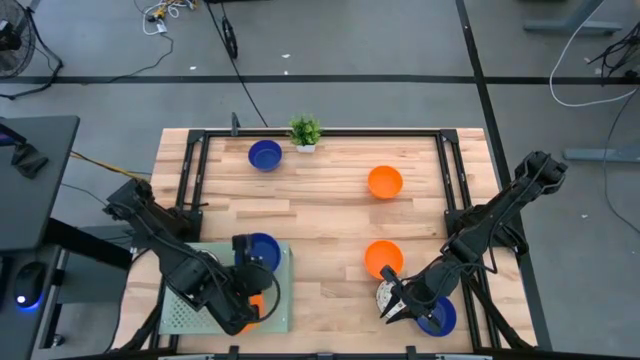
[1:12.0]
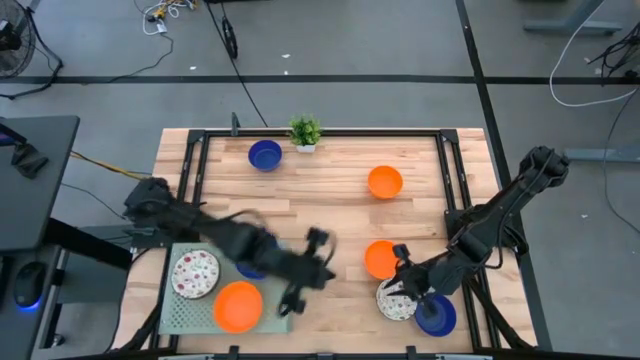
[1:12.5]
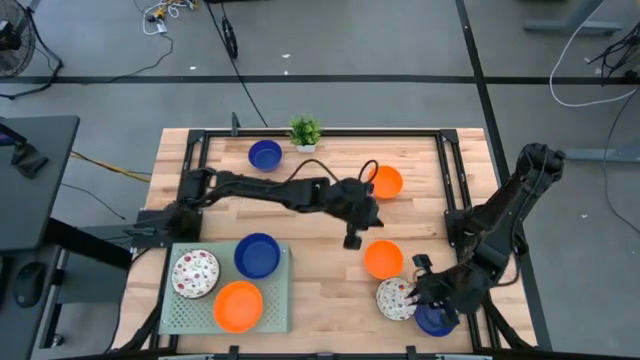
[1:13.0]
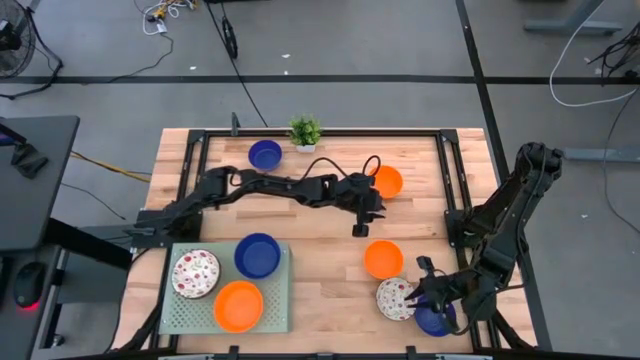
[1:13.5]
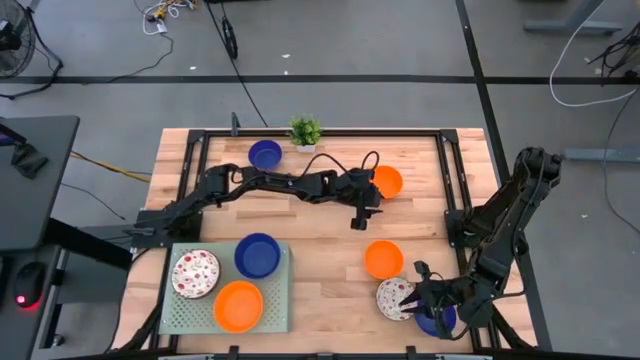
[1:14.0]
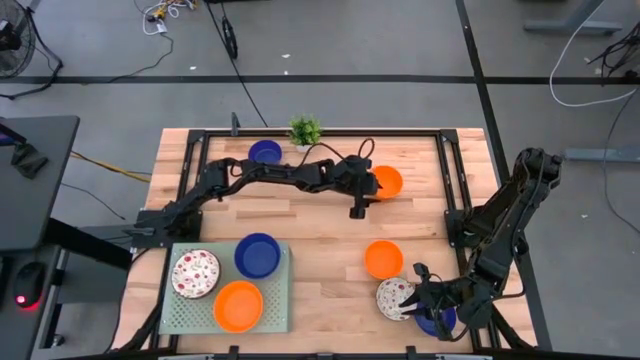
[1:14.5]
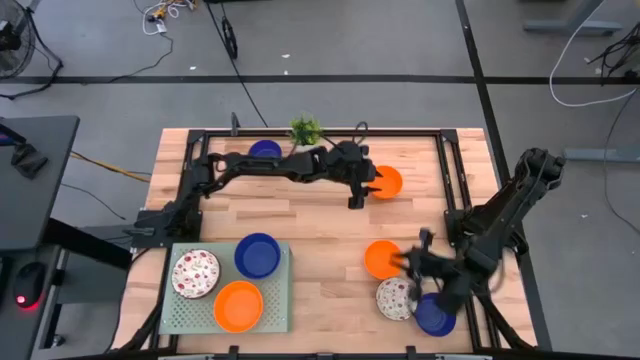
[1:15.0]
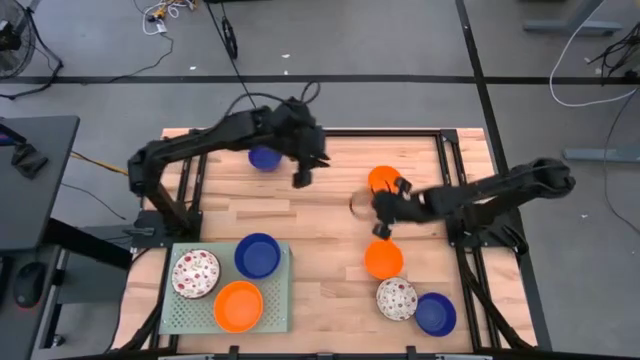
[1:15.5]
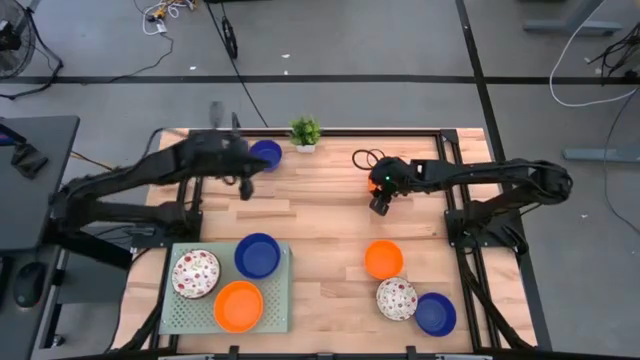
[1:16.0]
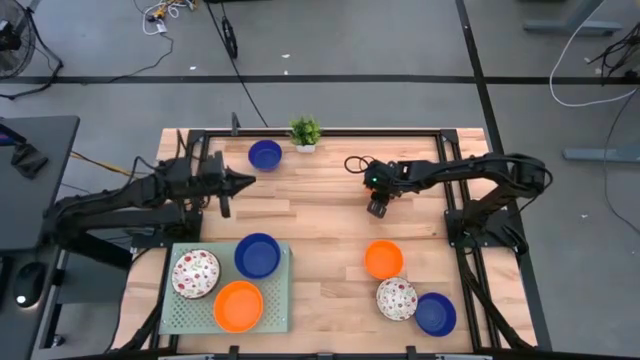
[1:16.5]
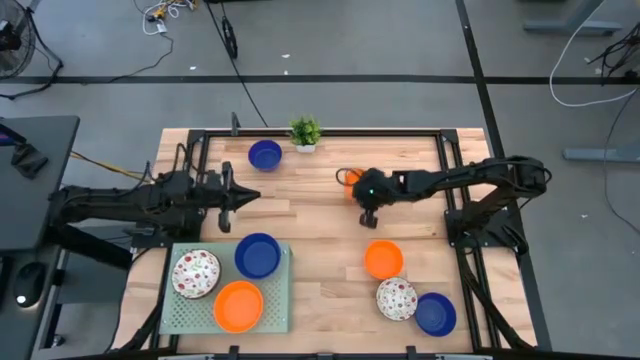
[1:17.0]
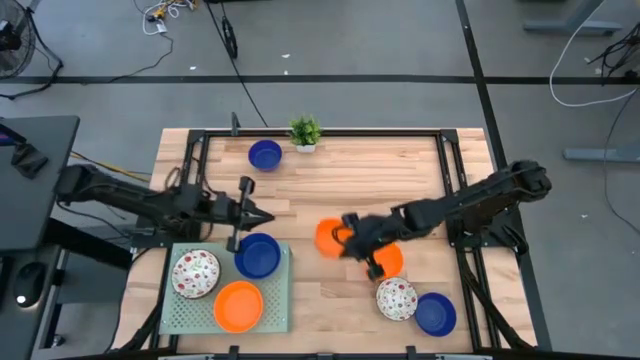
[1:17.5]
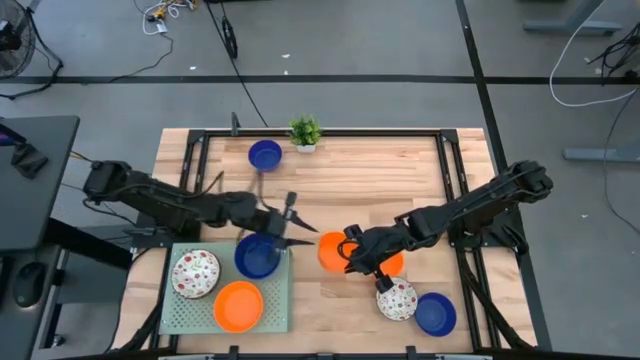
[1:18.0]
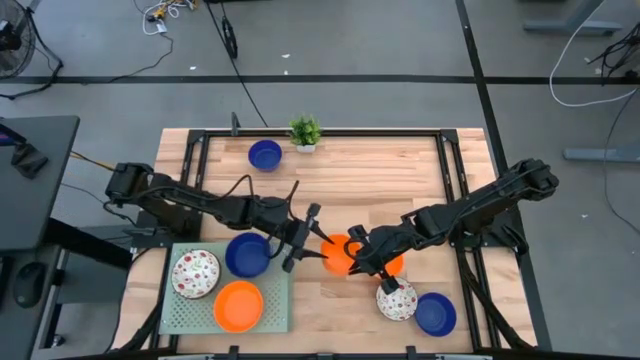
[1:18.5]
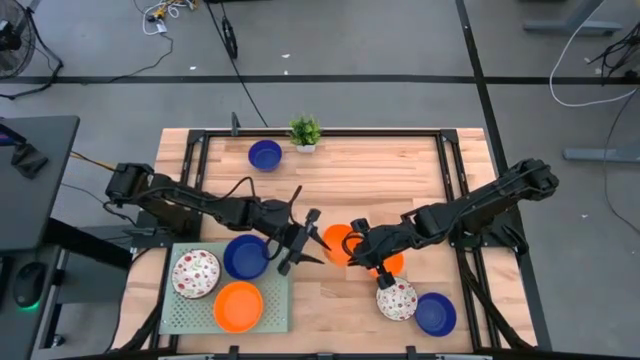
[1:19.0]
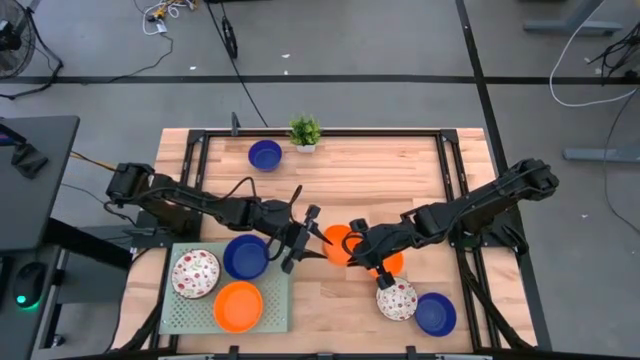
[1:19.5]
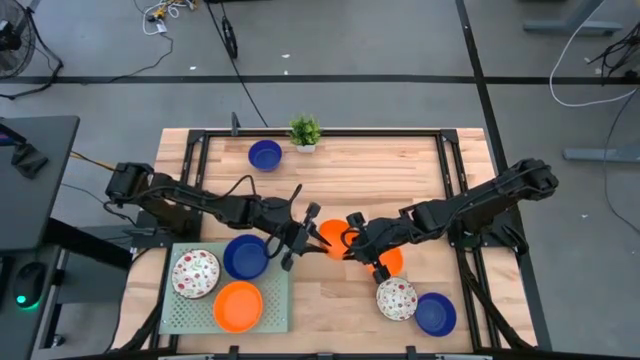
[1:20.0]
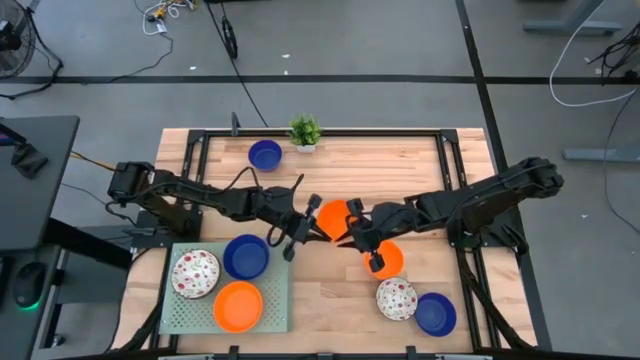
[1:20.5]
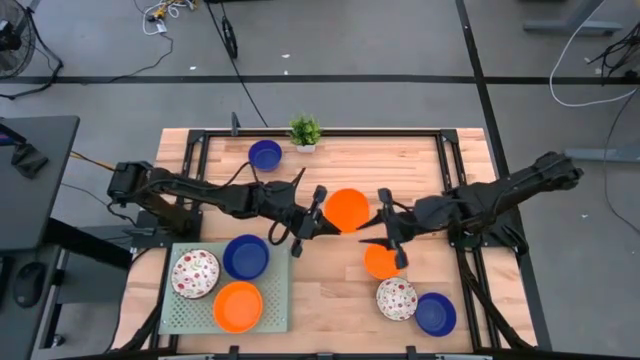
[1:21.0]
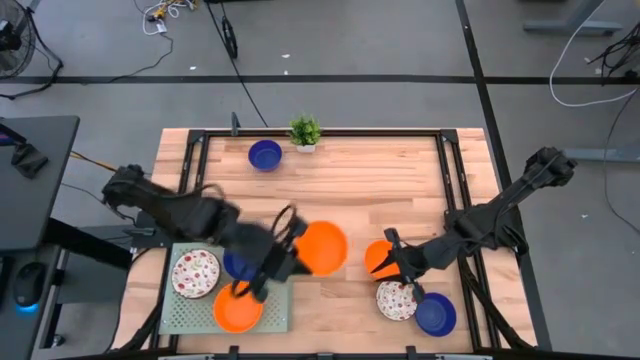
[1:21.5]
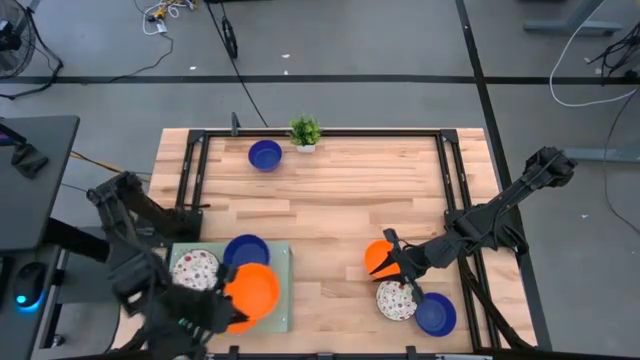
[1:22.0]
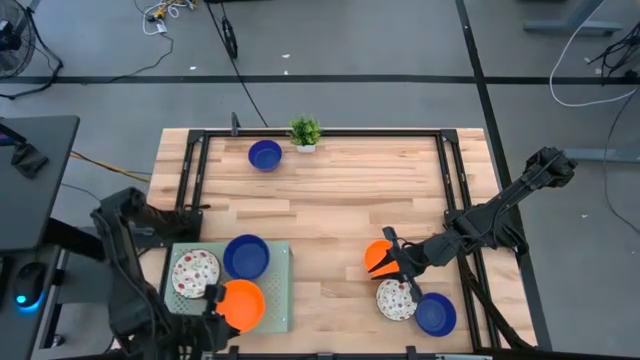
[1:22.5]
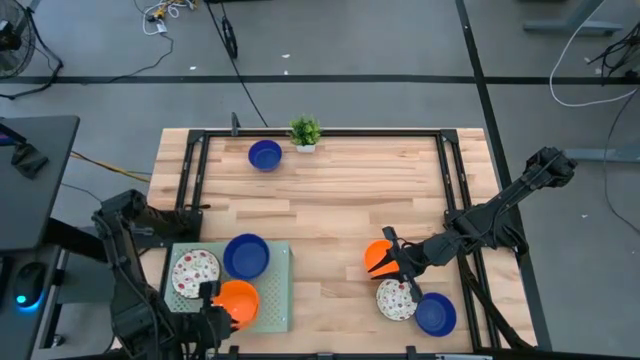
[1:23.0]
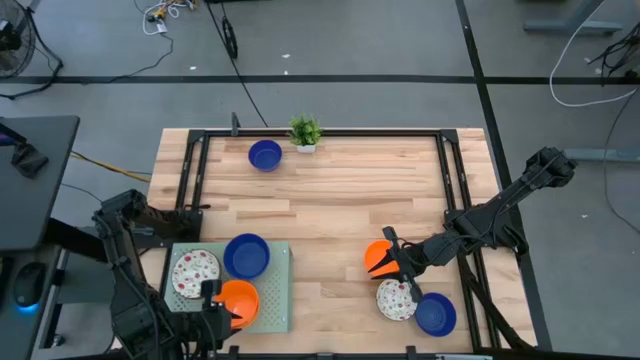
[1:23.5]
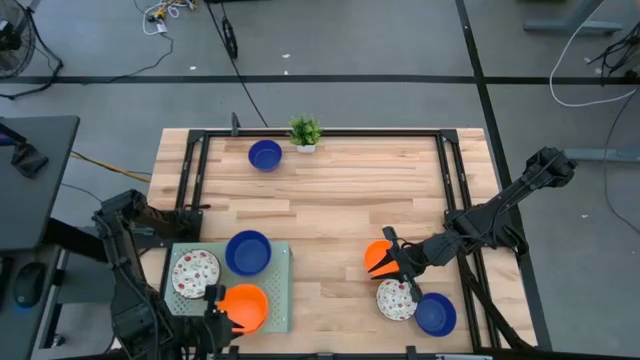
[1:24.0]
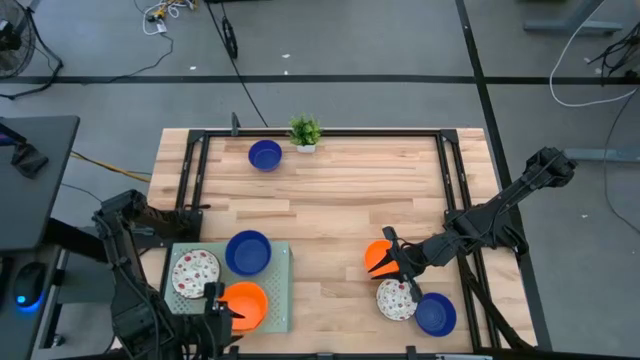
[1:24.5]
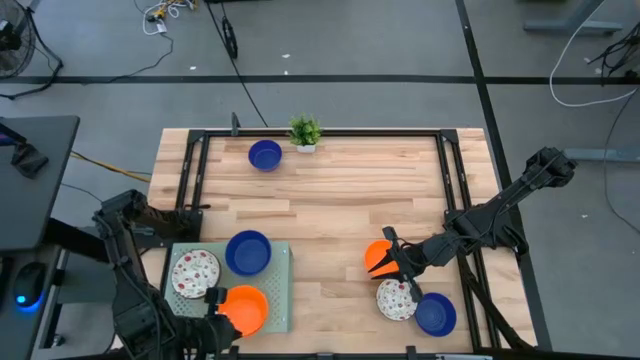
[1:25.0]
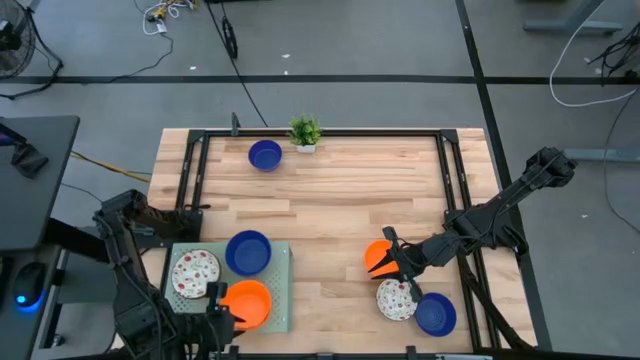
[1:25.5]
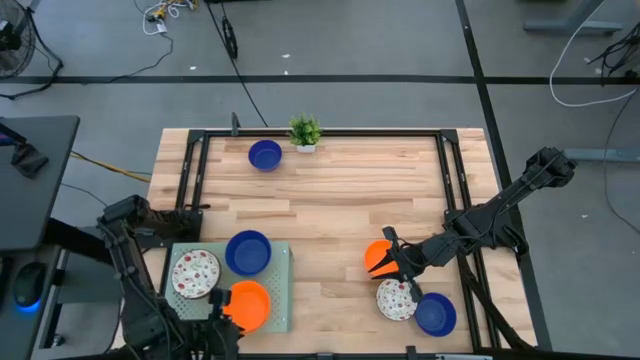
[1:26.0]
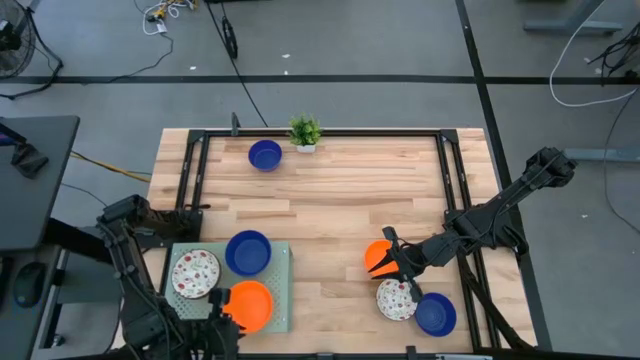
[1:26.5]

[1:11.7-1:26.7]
Task: Pick & Place Mini bowls
Stack the orange bowl on top of the orange bowl on the shelf

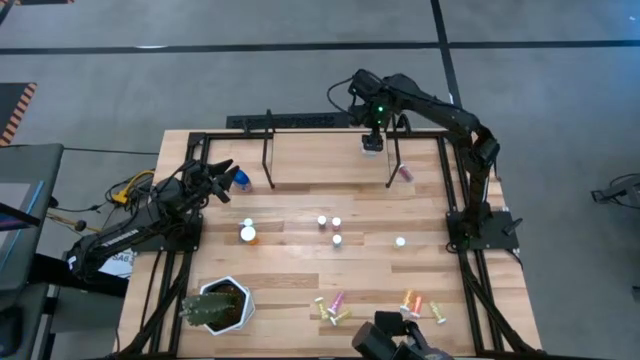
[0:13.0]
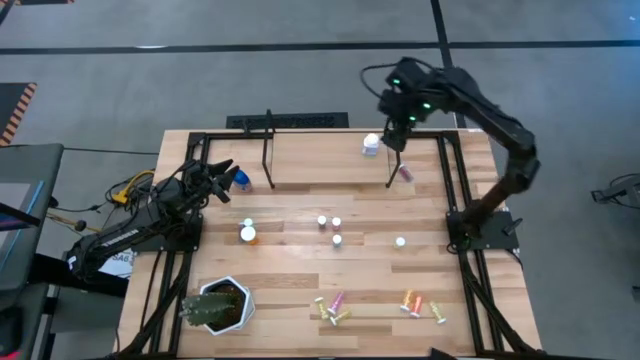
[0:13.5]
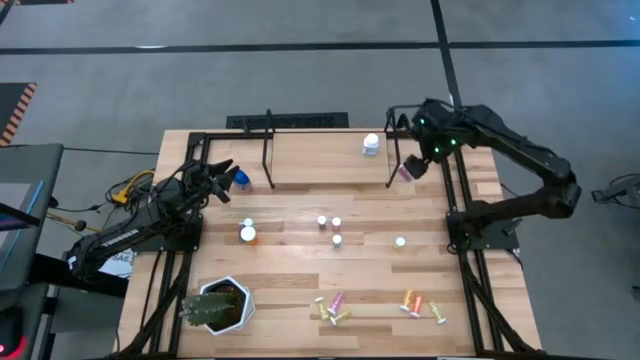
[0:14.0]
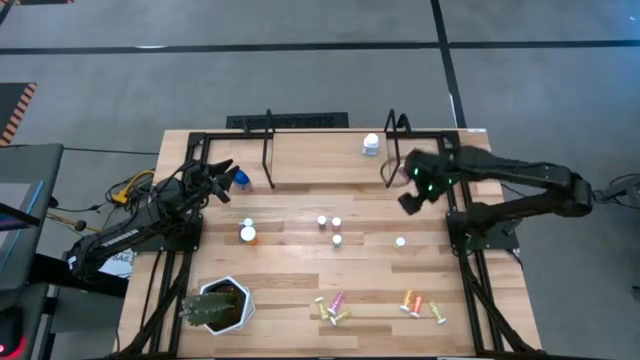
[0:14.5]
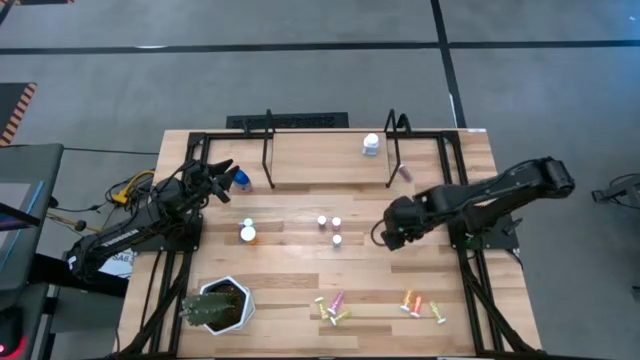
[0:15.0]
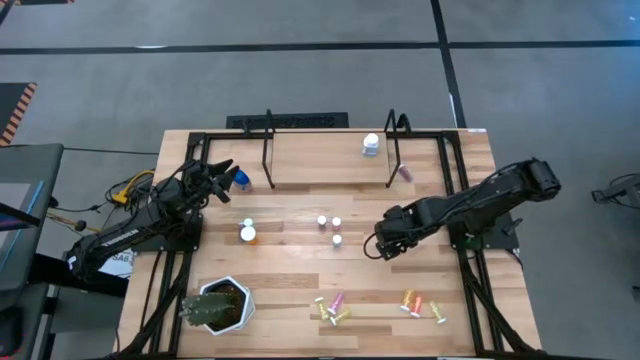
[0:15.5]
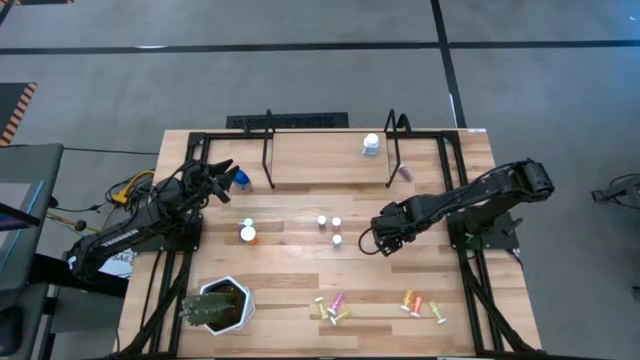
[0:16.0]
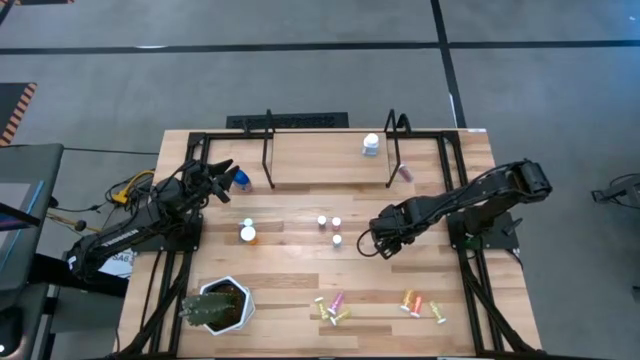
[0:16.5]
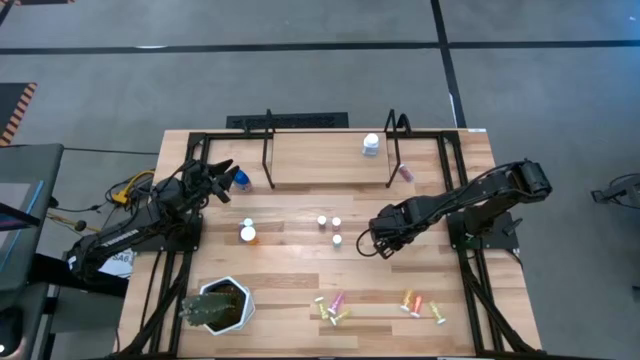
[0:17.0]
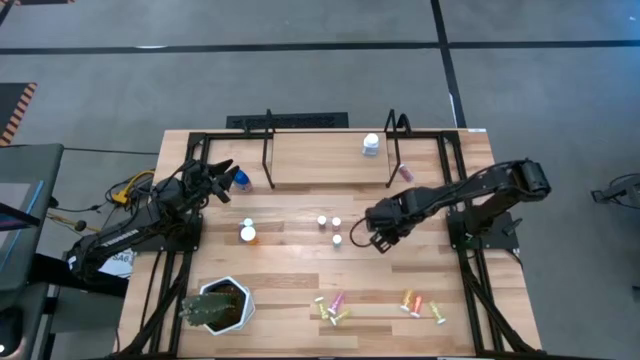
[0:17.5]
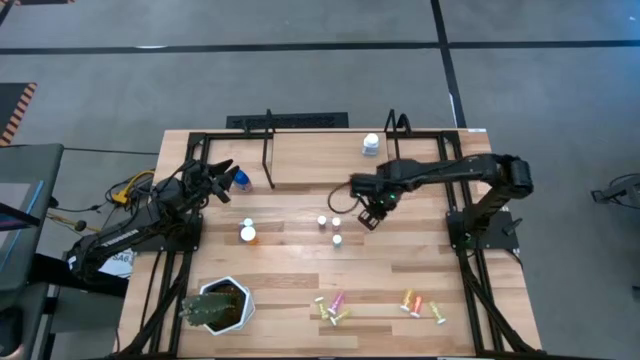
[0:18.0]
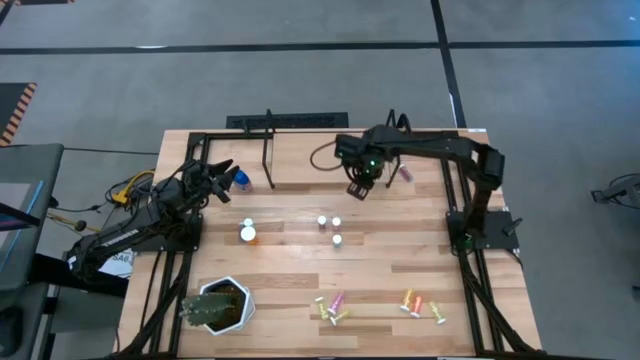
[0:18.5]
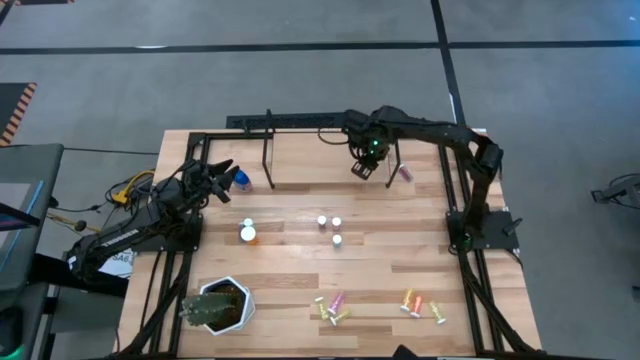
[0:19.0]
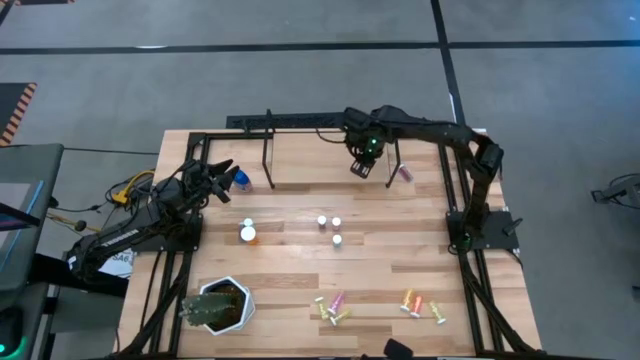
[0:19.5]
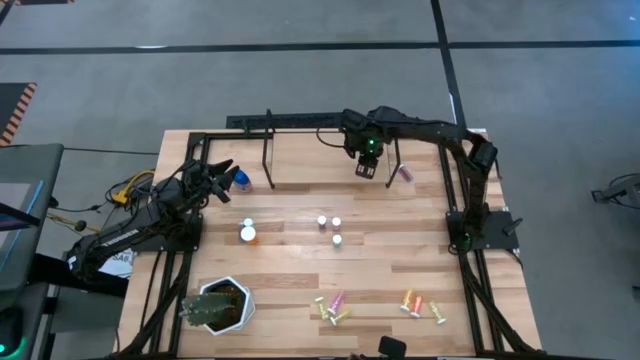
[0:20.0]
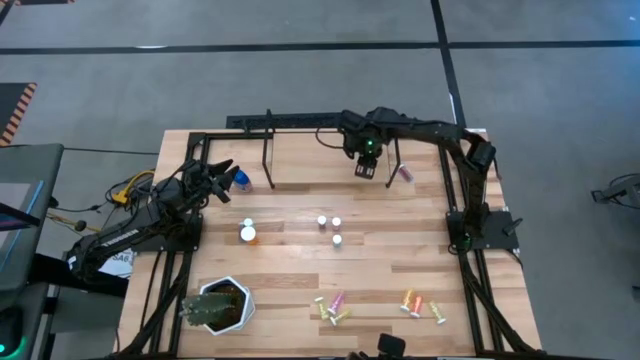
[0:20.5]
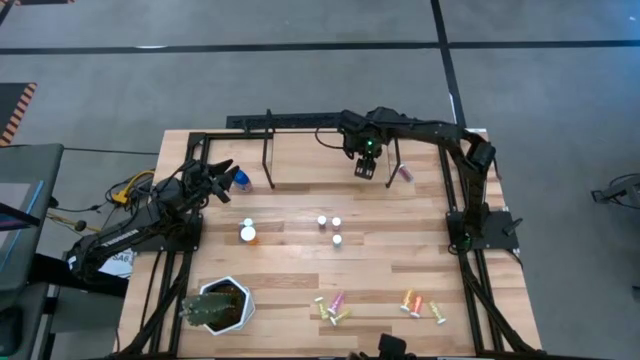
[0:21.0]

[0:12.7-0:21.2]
Task: Pick and place medicine bottles onto shelf by color
Put the yellow pill bottle on the shelf
